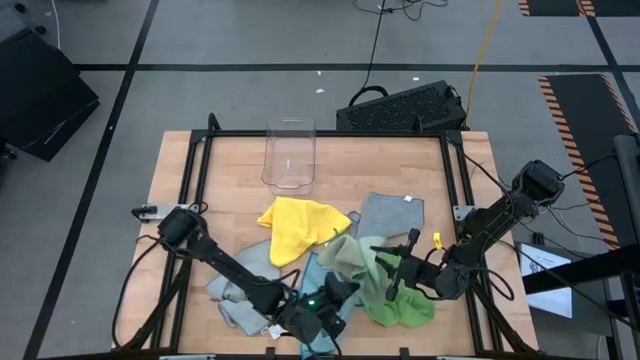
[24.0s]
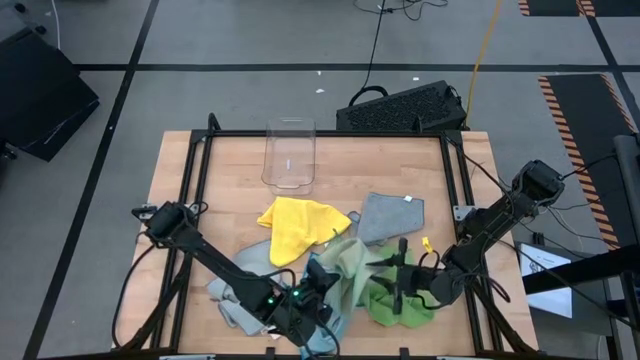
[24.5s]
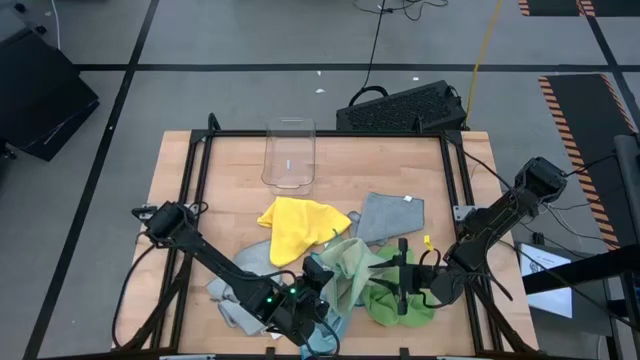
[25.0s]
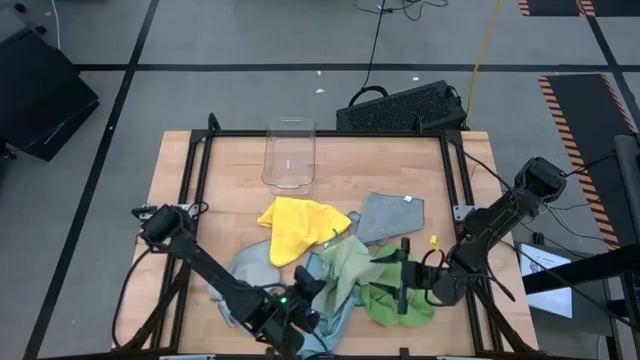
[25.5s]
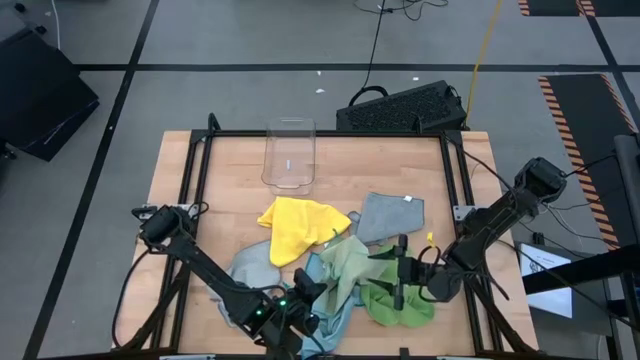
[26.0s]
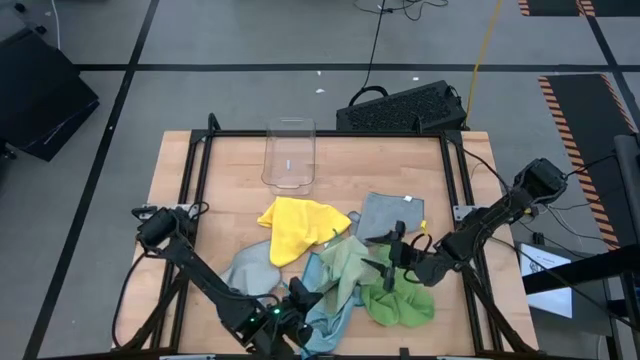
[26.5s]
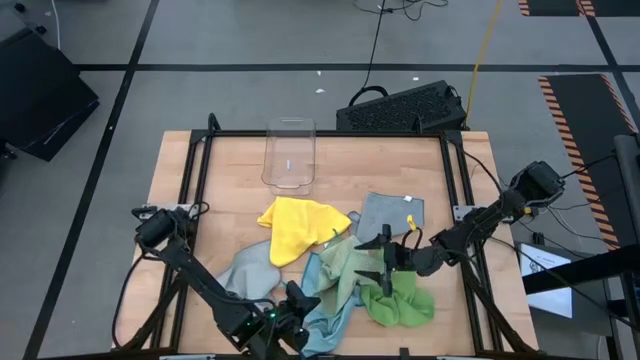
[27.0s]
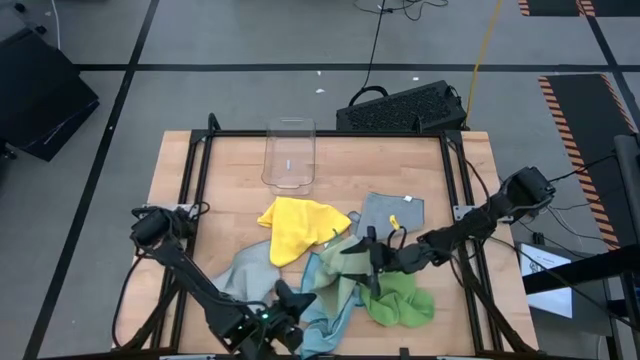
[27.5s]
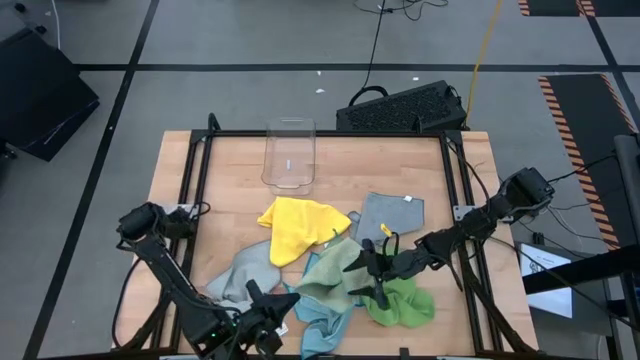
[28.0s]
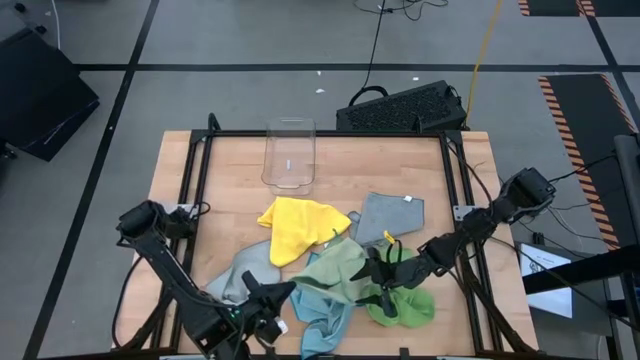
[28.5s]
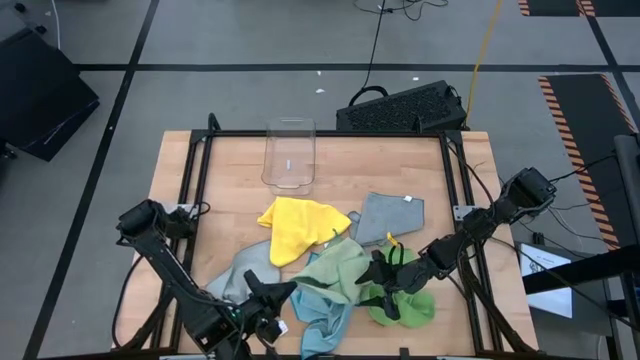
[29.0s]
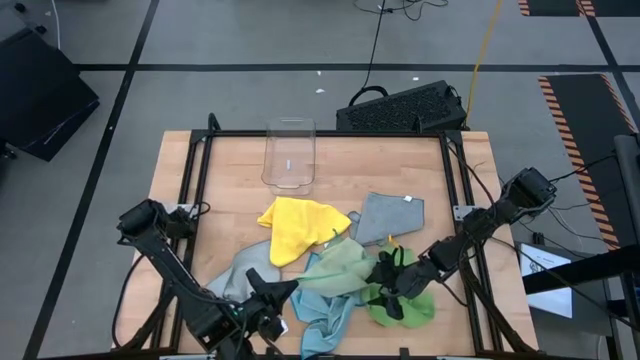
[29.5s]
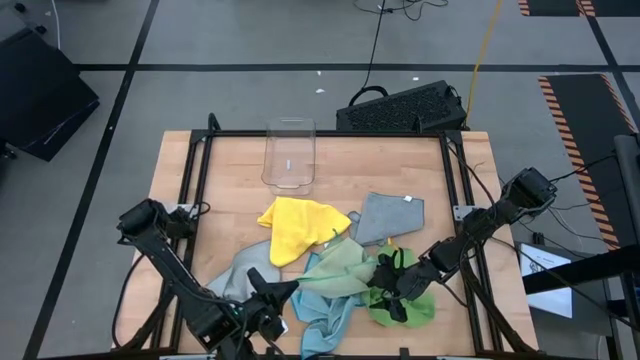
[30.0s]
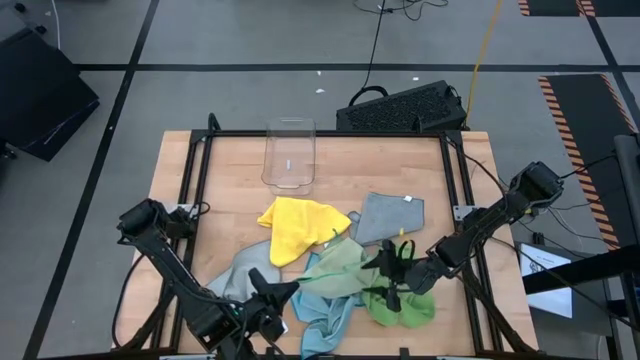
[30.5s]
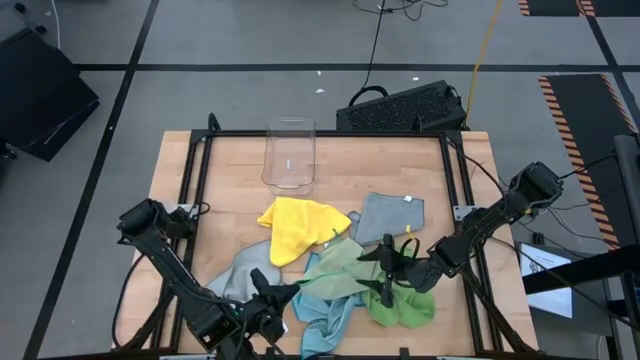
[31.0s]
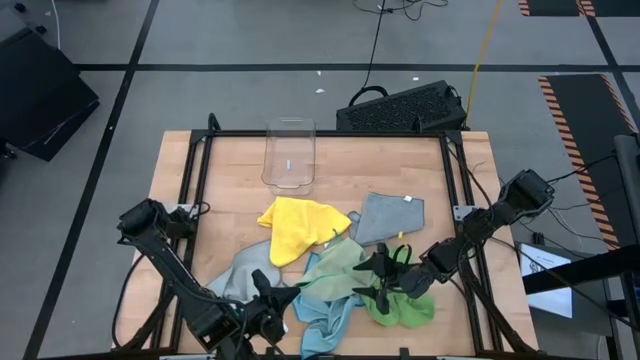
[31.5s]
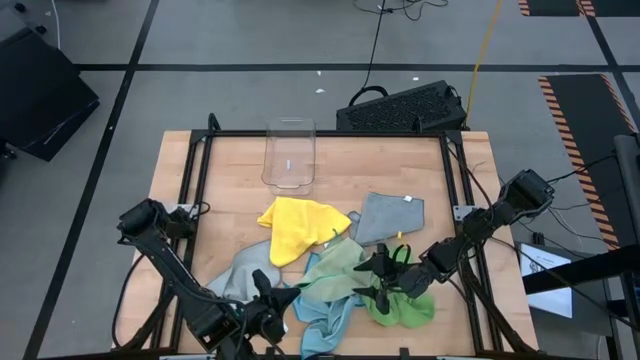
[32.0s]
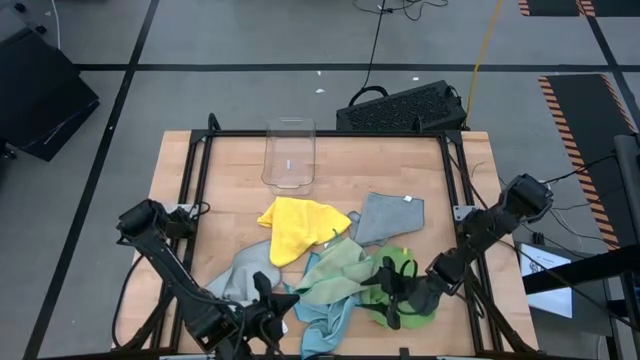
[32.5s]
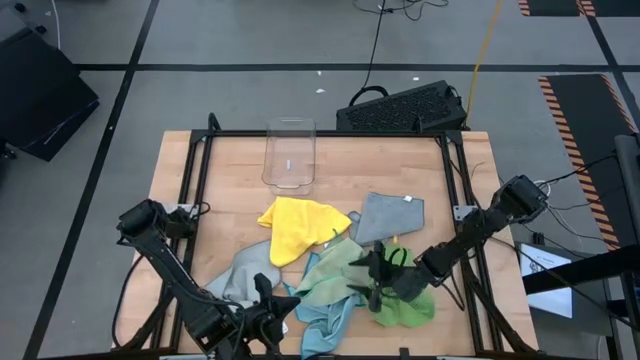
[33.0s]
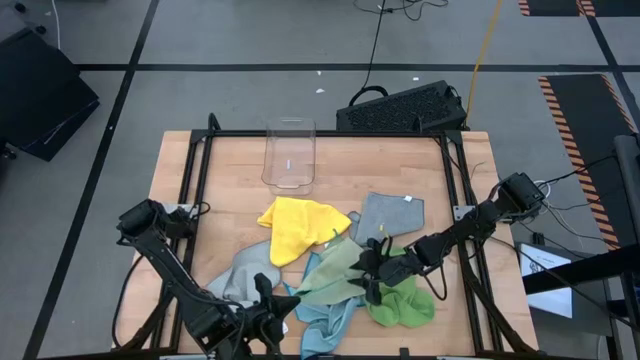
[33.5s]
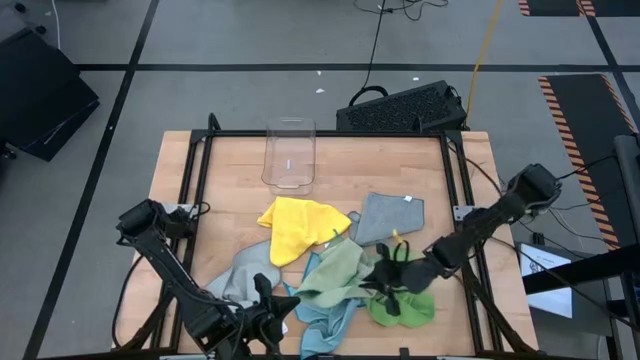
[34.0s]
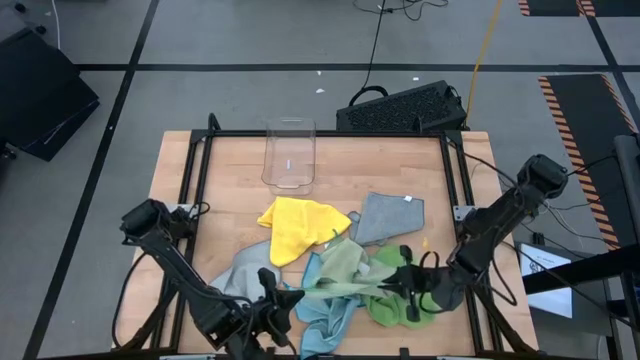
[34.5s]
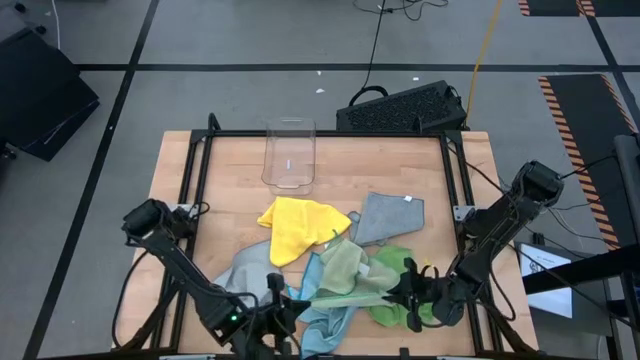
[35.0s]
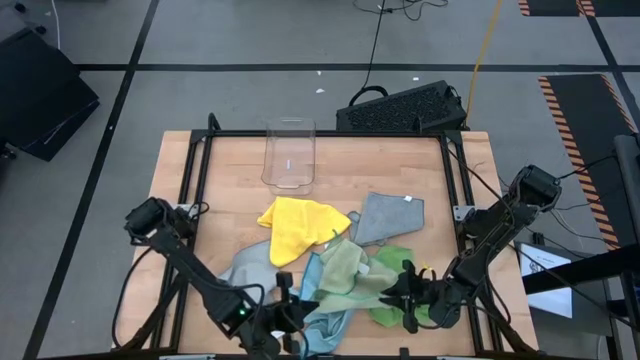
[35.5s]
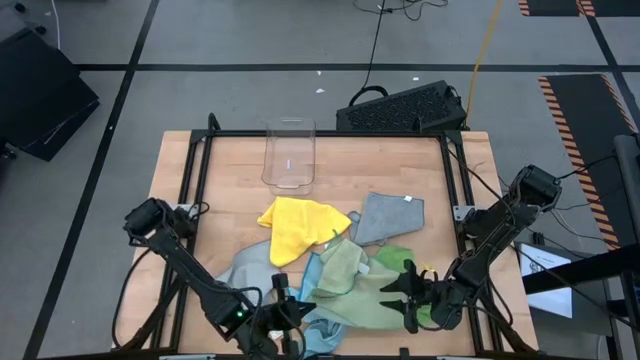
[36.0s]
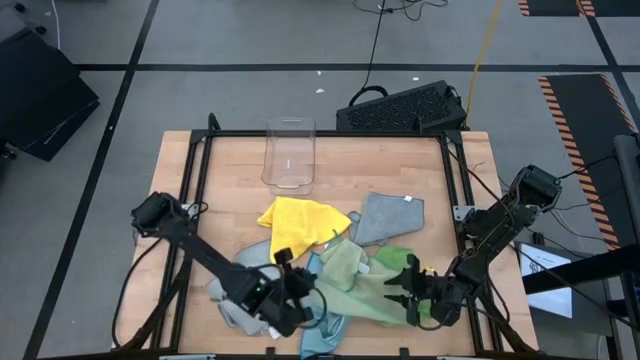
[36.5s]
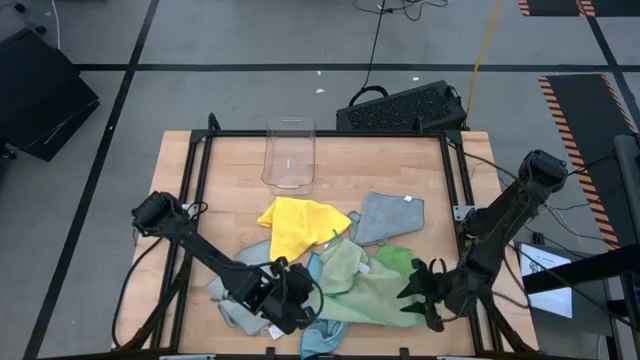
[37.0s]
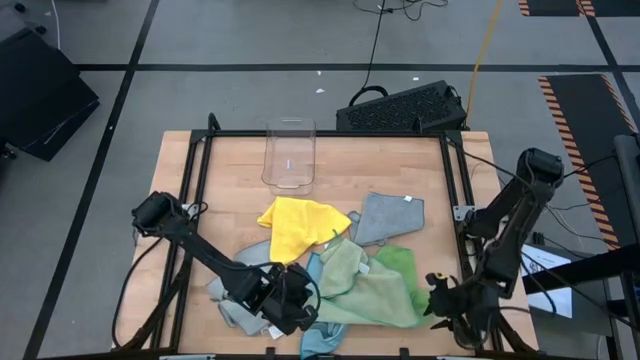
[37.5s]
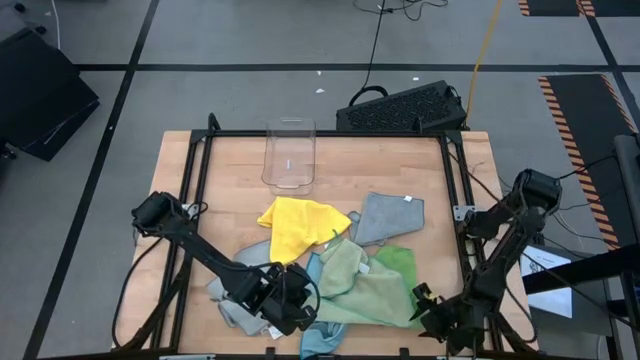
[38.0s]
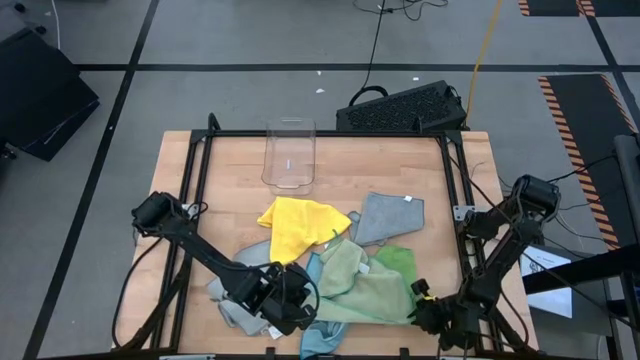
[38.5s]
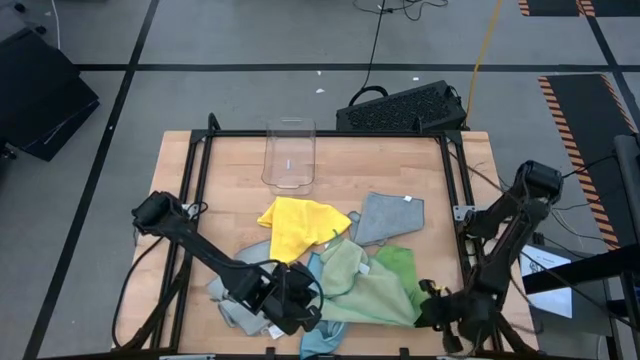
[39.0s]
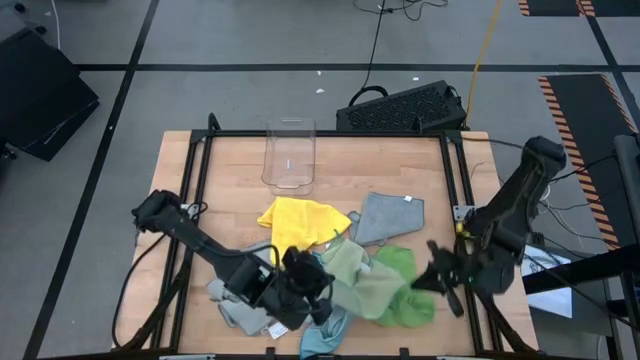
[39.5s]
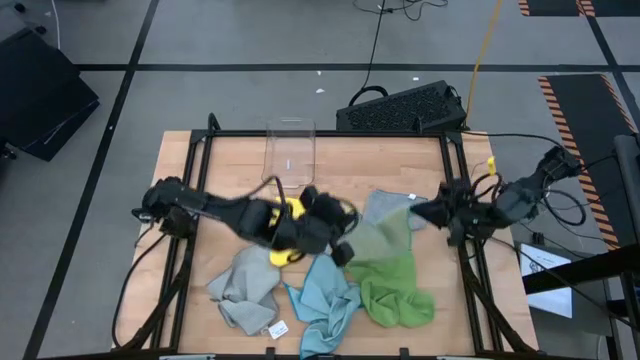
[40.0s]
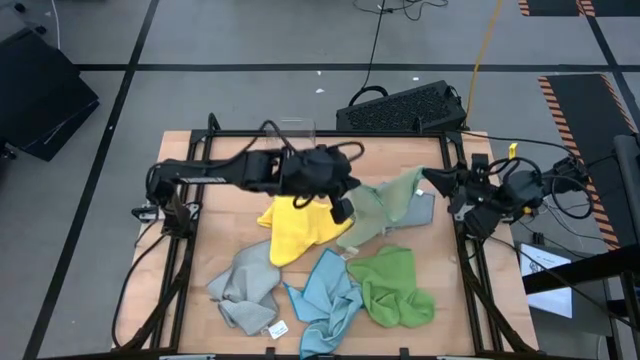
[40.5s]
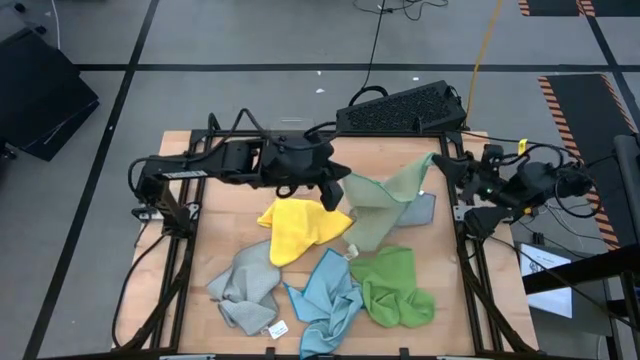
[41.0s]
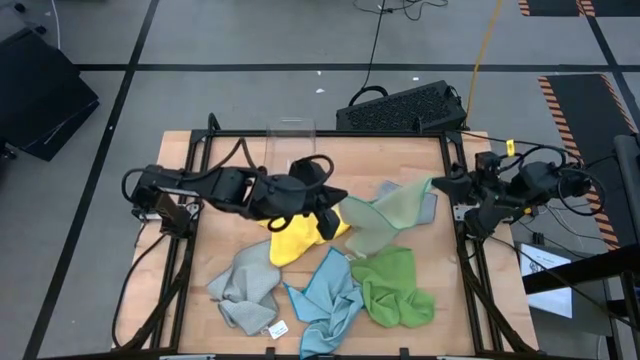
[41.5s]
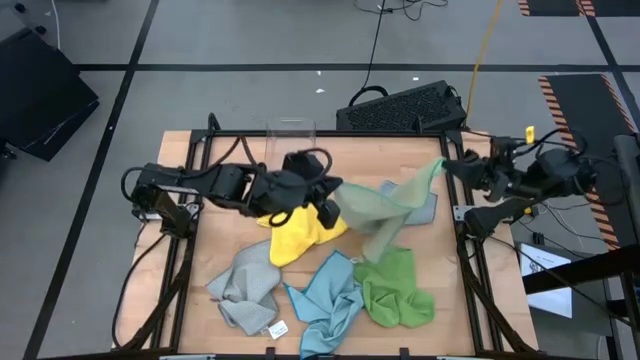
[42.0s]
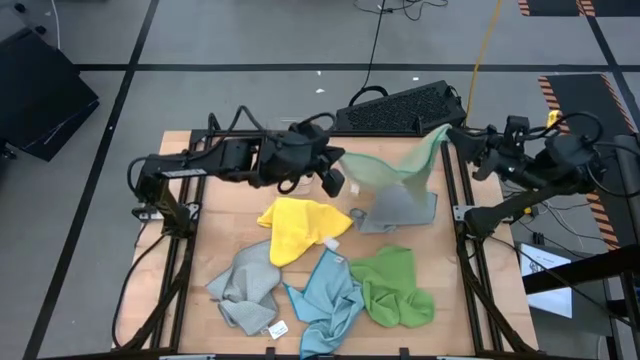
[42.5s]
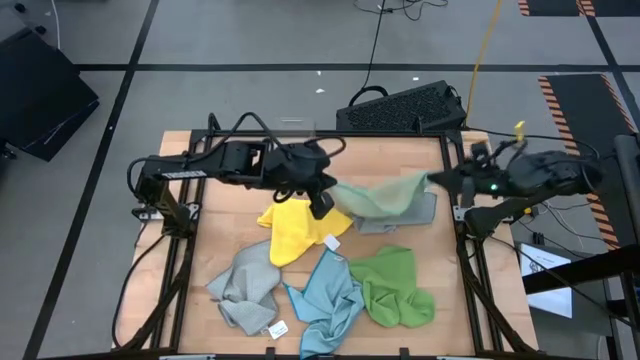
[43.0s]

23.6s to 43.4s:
Task: Fold microfiber towels
Fold the light green microfiber cloth
